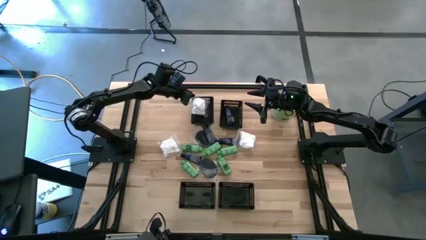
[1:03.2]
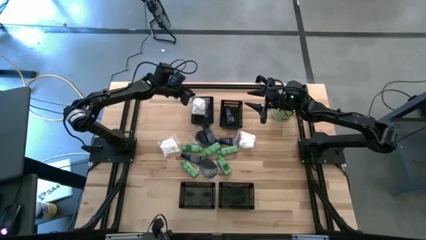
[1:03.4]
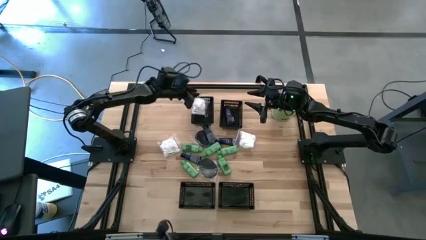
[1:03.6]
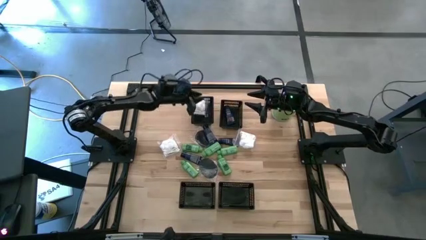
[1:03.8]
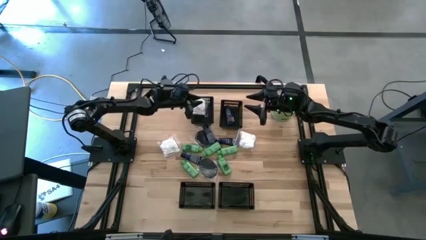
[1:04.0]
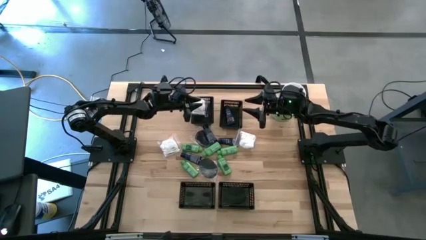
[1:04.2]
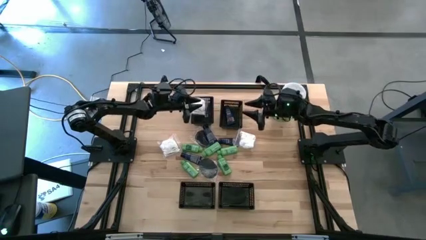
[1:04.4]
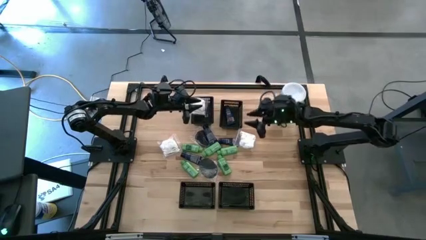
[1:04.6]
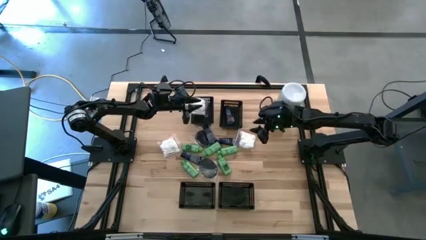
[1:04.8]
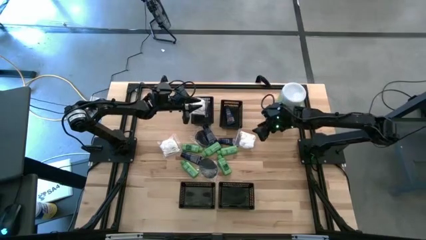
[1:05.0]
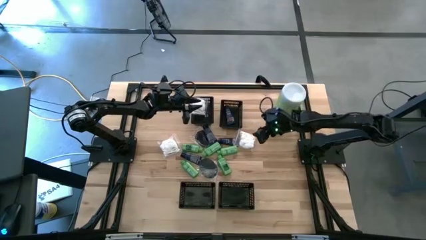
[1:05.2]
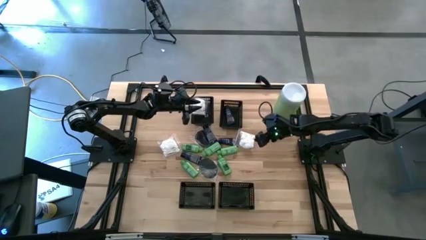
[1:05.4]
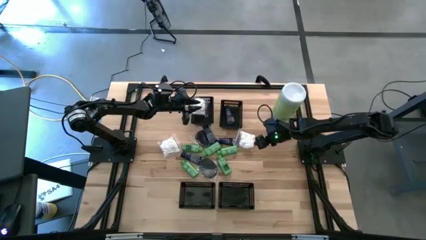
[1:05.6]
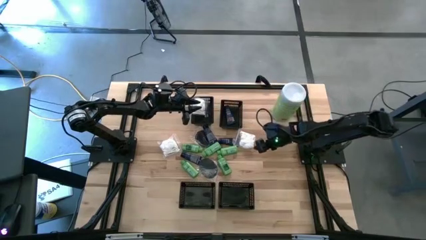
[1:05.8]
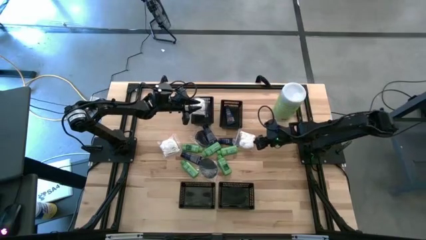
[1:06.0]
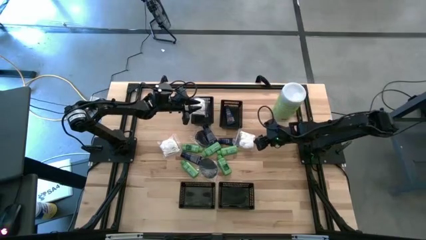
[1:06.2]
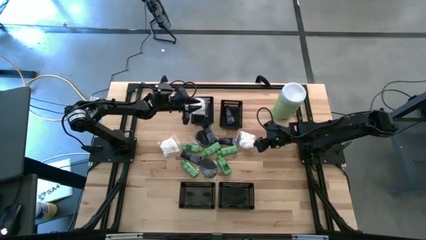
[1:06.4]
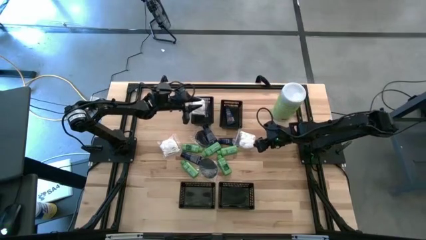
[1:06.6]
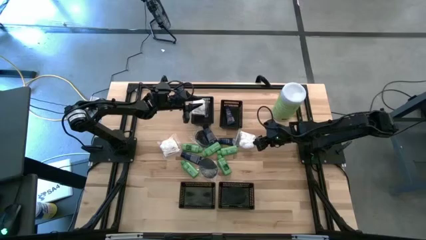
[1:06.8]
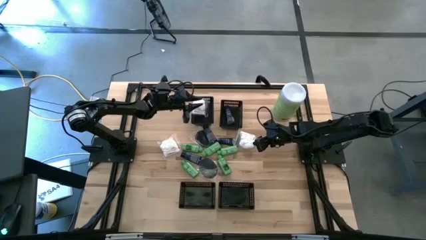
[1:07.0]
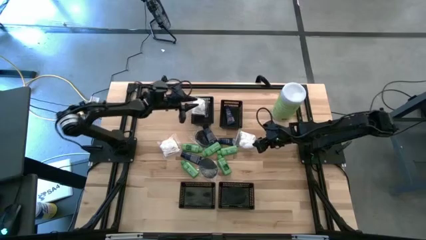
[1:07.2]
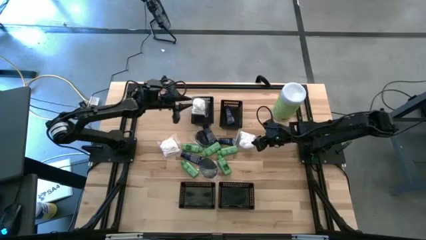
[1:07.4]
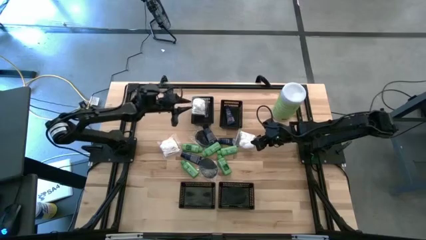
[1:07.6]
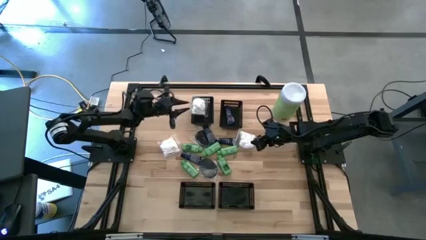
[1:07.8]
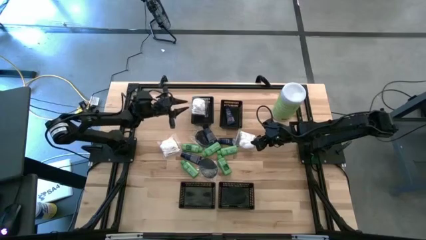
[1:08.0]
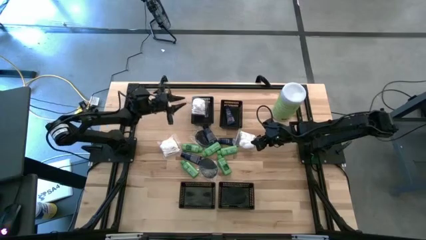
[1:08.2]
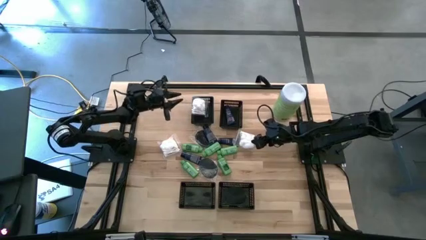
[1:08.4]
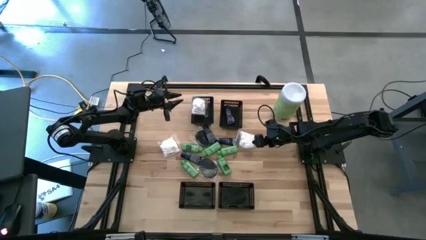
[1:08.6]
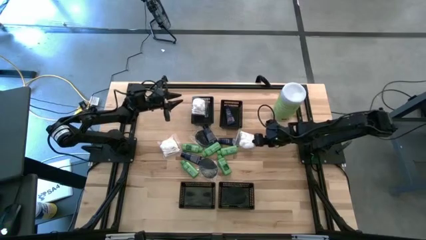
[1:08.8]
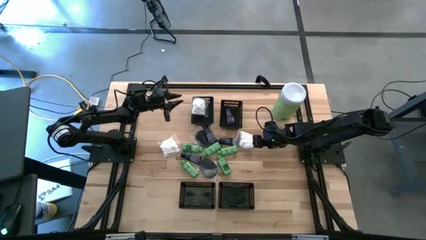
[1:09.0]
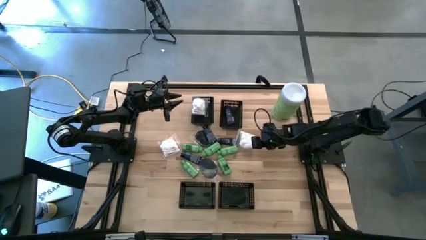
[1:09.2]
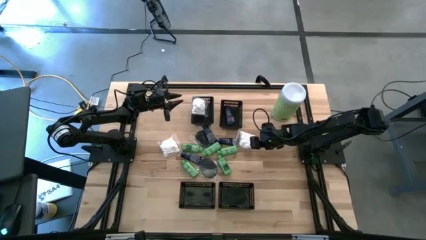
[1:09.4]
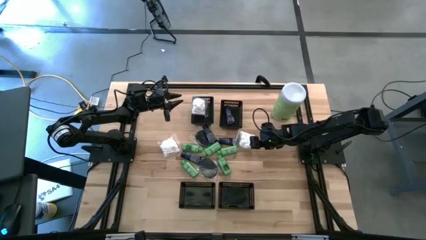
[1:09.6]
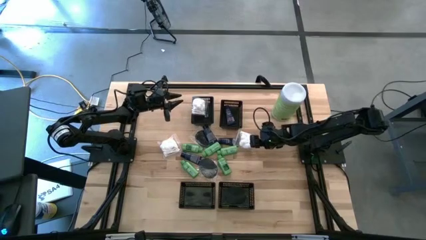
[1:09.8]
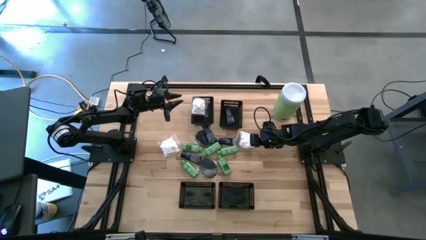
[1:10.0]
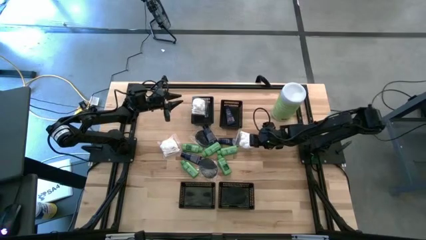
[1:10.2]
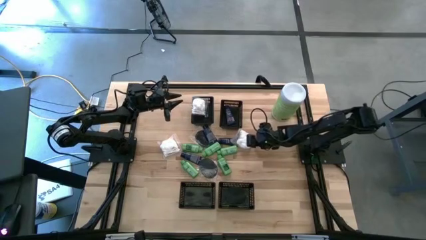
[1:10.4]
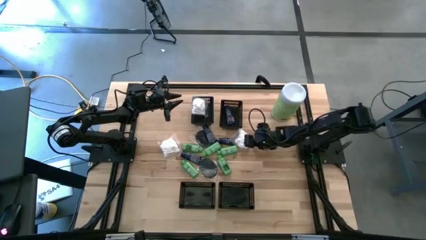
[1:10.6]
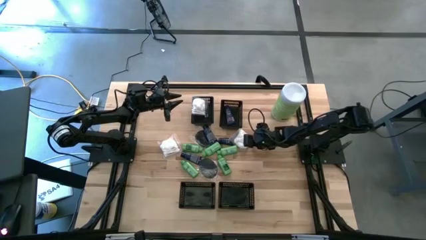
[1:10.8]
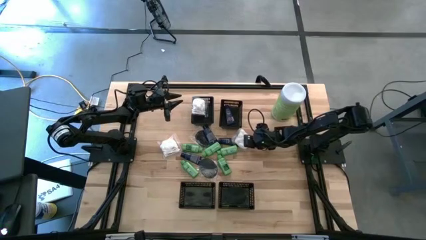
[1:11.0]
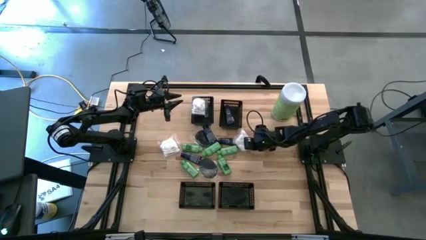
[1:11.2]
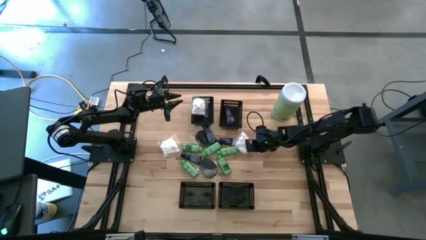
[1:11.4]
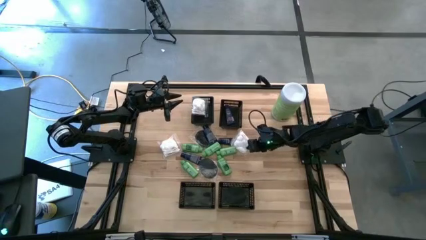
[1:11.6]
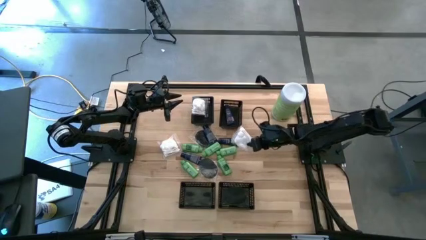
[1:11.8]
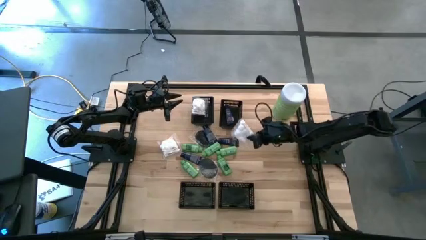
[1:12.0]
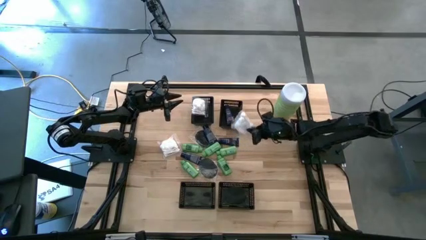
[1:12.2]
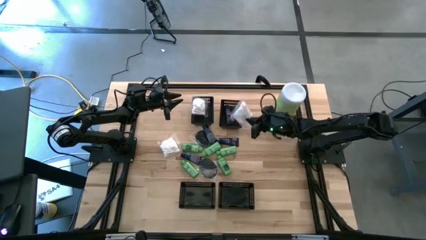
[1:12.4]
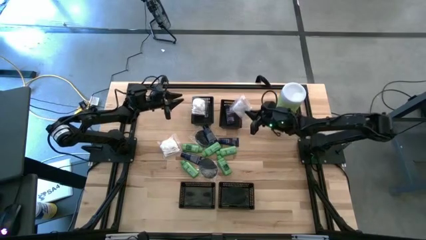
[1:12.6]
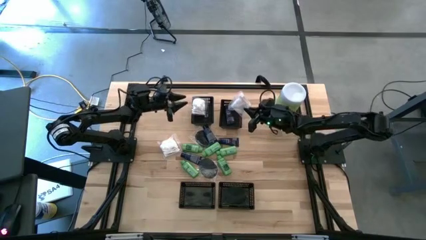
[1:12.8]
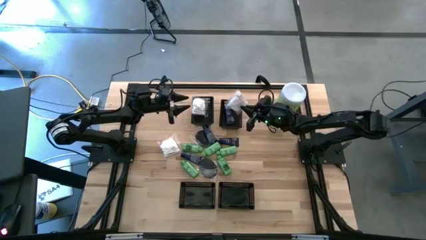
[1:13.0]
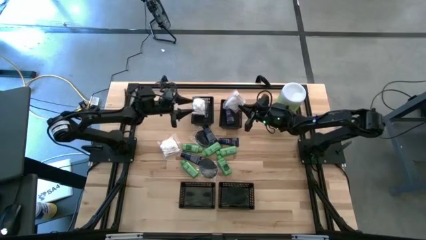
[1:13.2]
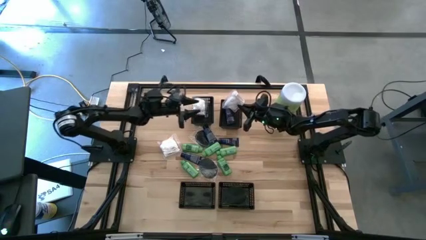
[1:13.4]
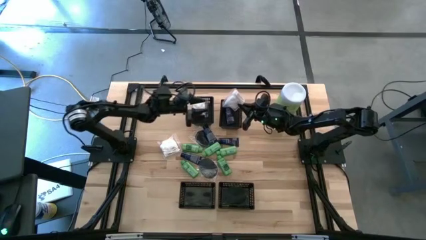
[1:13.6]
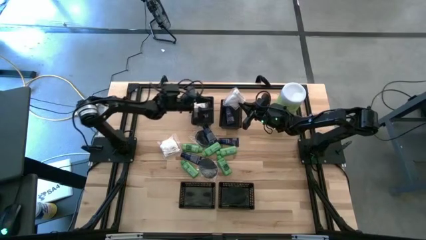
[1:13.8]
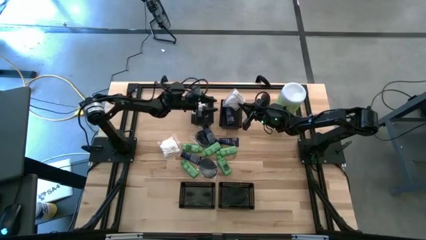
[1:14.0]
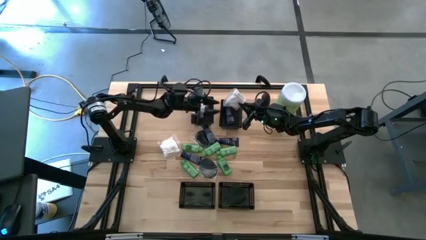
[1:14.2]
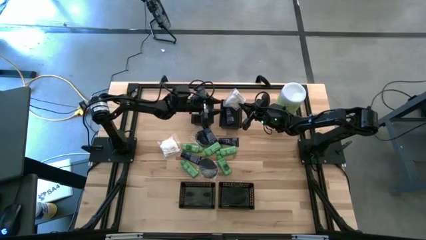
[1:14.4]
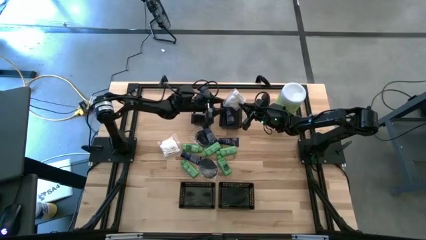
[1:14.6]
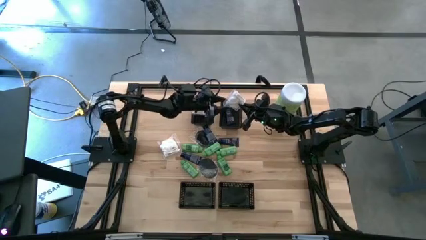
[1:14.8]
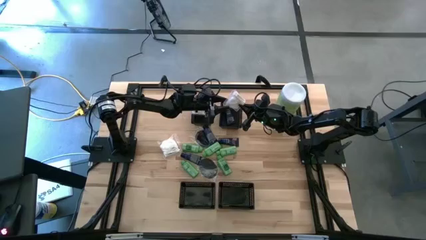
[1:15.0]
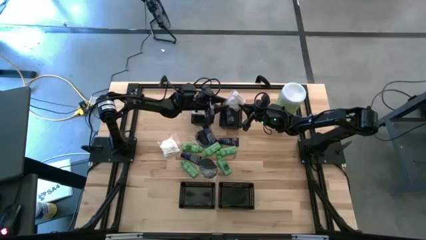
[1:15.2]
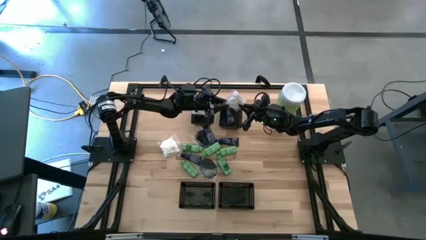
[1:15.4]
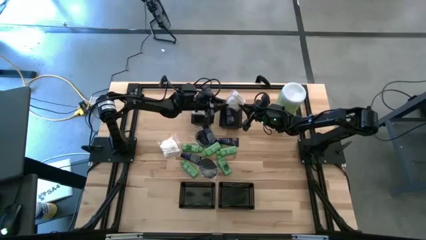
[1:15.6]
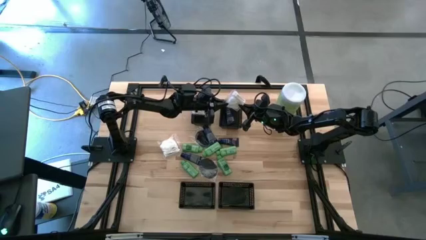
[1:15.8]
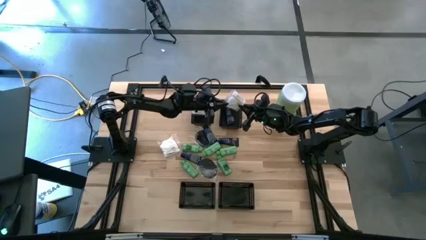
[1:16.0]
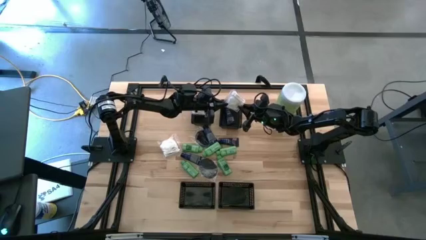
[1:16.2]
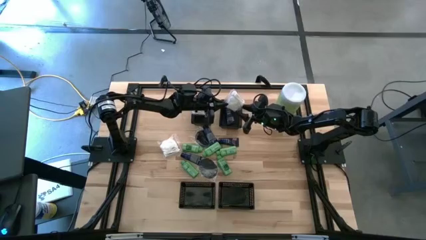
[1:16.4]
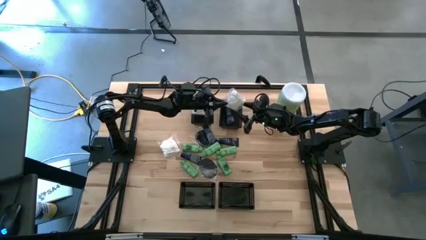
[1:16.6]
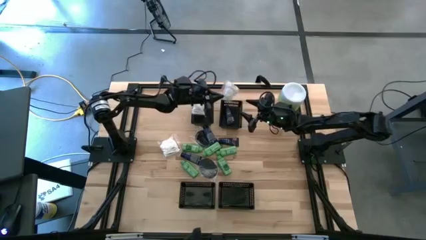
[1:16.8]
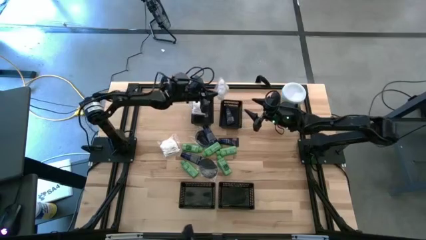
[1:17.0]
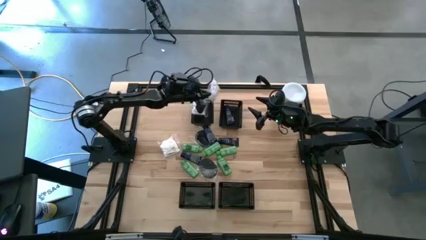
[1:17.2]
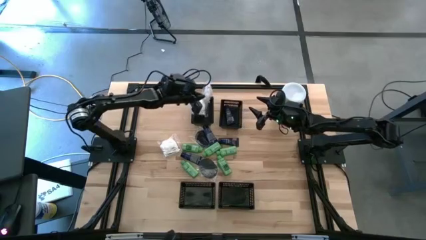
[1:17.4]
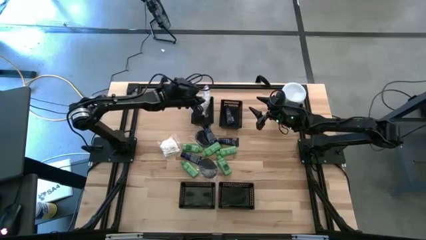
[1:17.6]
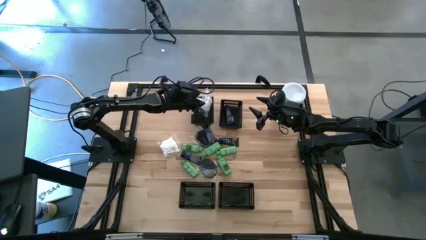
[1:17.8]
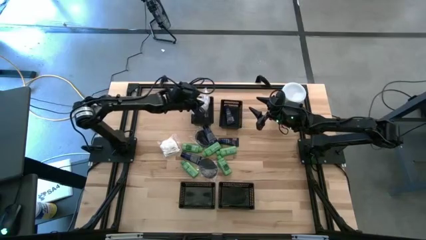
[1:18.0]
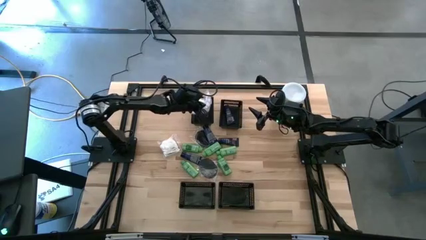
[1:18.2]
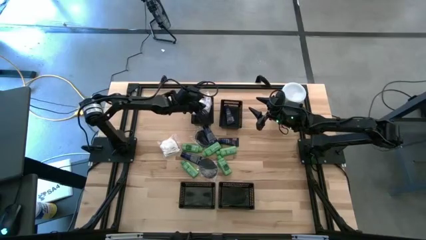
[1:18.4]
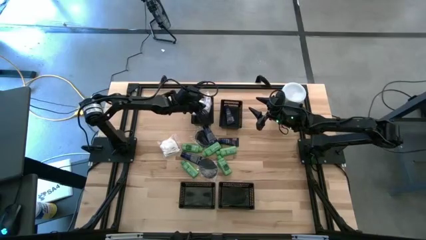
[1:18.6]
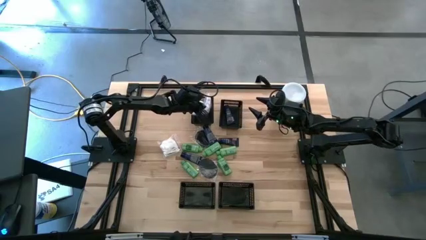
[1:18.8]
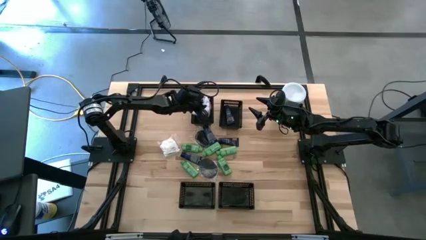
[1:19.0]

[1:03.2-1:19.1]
Task: Pick & Place Travel size toiletries
Put the cotton pack into the top left black bin
